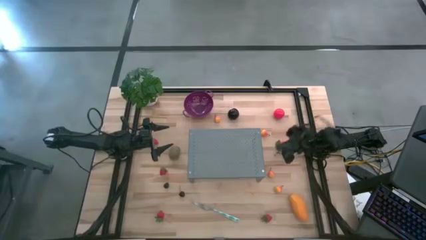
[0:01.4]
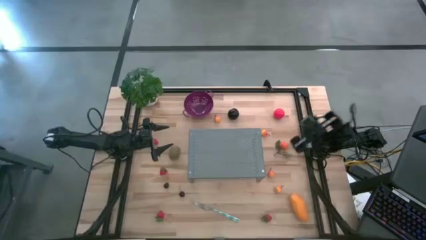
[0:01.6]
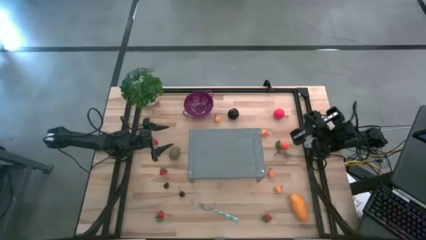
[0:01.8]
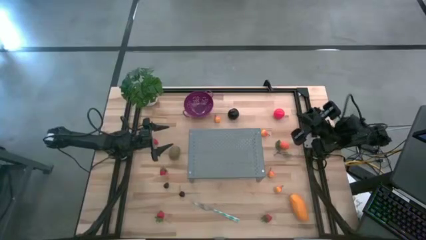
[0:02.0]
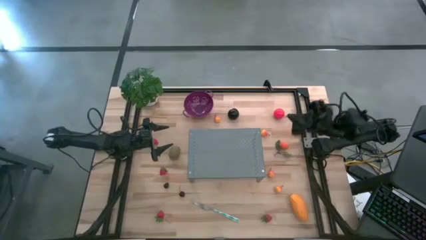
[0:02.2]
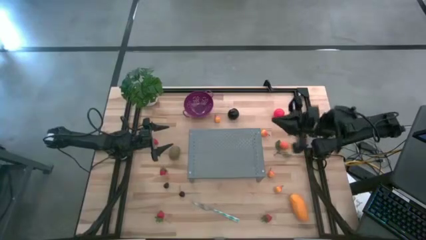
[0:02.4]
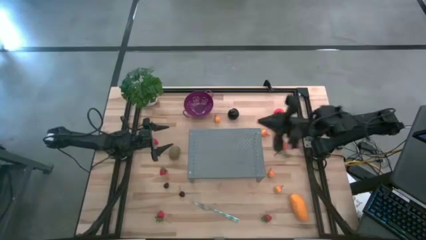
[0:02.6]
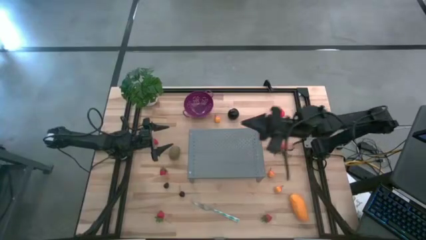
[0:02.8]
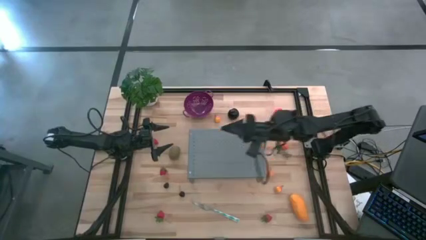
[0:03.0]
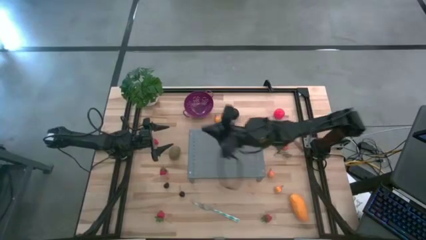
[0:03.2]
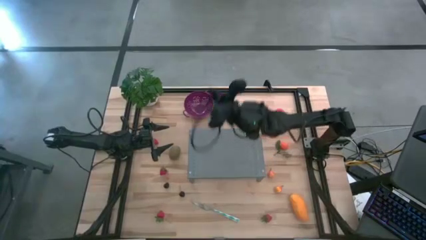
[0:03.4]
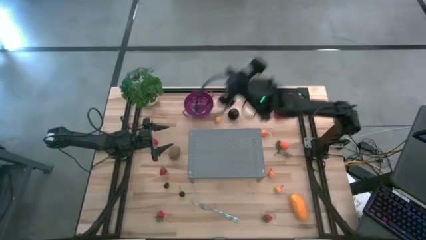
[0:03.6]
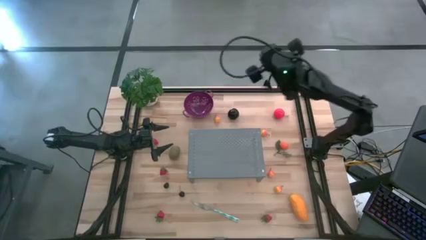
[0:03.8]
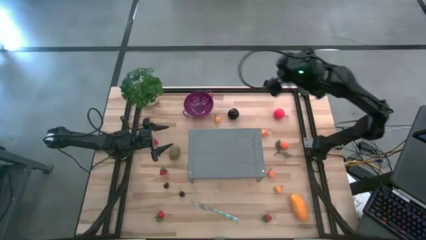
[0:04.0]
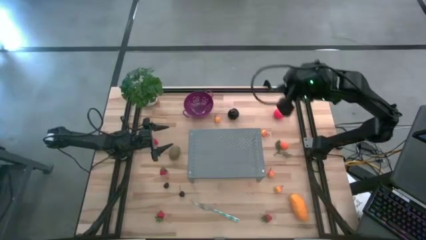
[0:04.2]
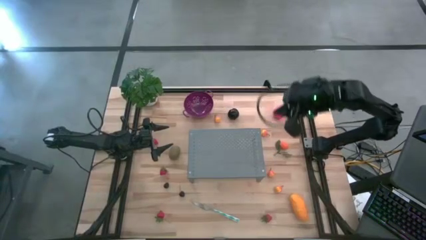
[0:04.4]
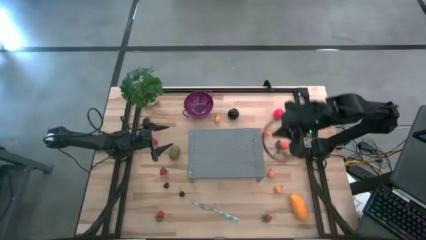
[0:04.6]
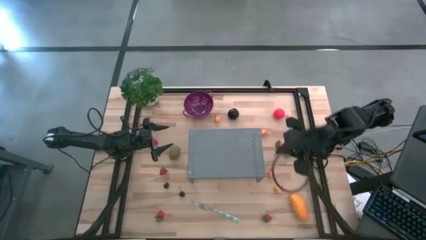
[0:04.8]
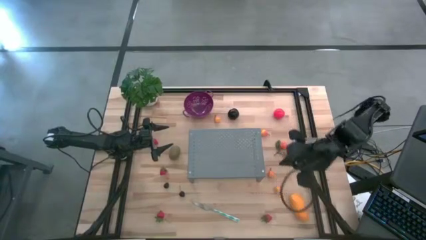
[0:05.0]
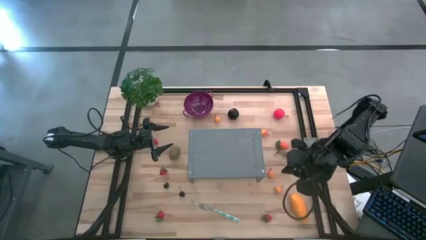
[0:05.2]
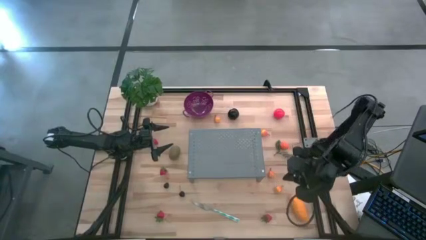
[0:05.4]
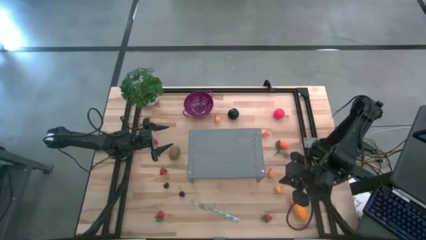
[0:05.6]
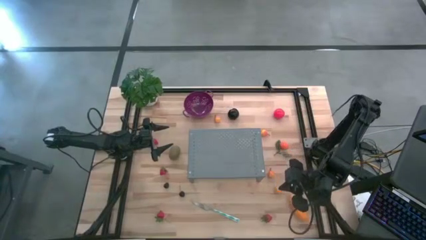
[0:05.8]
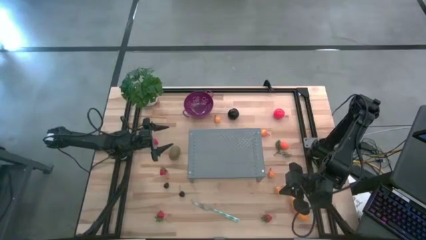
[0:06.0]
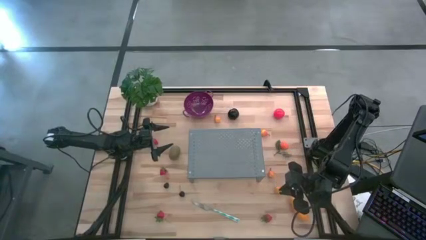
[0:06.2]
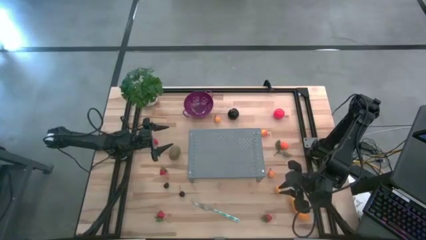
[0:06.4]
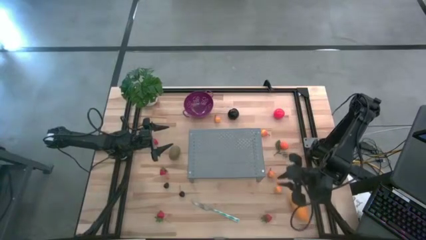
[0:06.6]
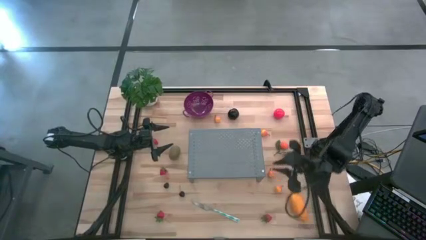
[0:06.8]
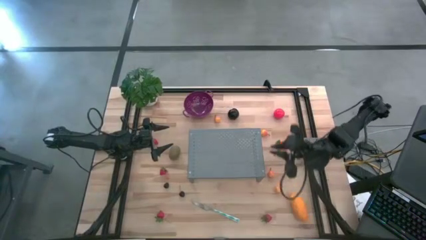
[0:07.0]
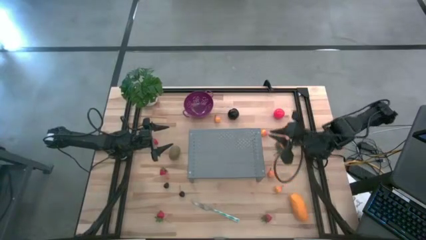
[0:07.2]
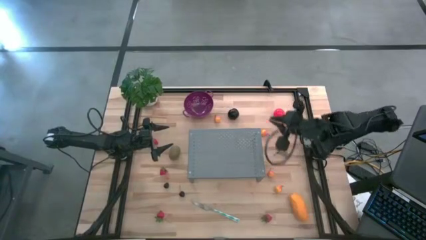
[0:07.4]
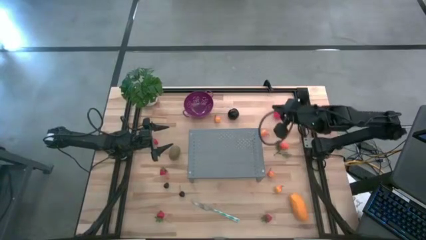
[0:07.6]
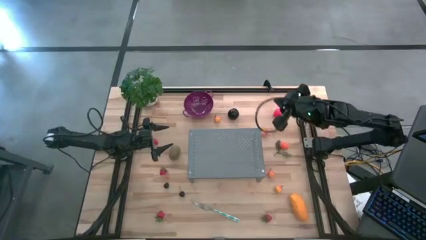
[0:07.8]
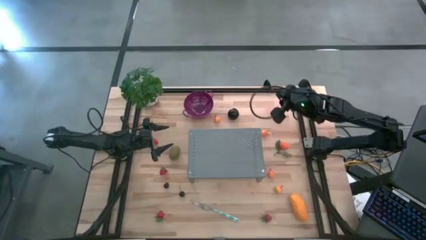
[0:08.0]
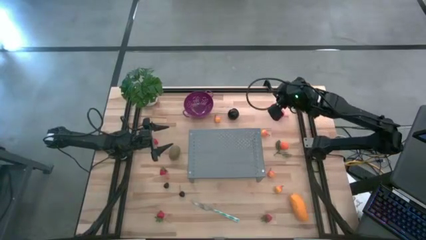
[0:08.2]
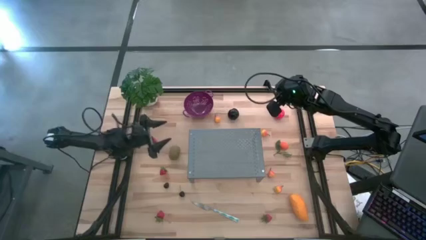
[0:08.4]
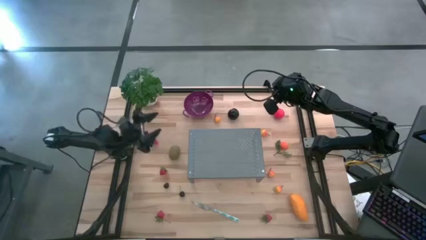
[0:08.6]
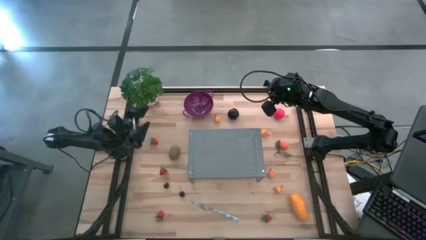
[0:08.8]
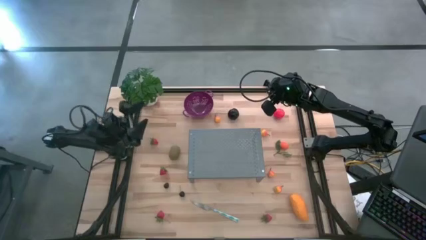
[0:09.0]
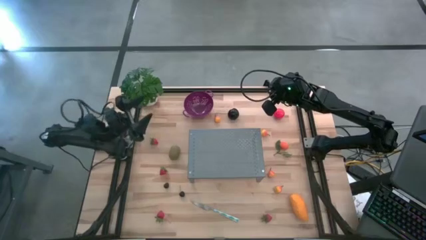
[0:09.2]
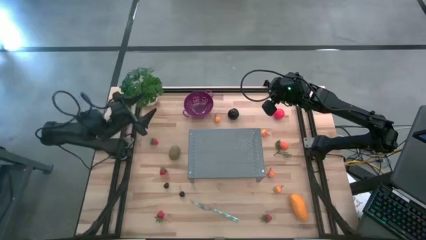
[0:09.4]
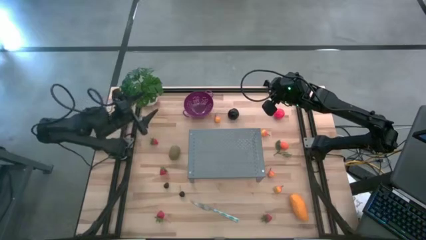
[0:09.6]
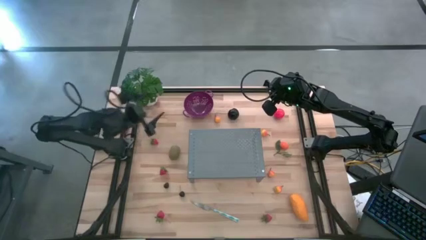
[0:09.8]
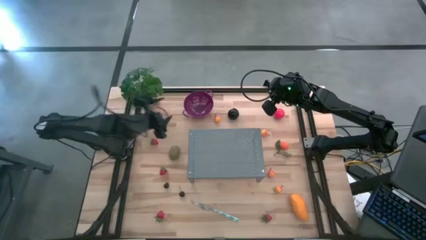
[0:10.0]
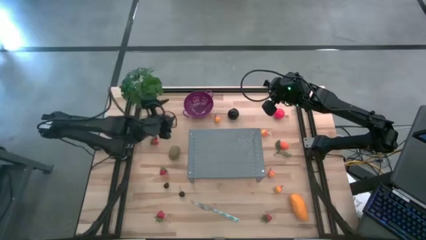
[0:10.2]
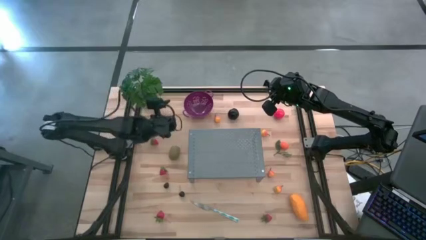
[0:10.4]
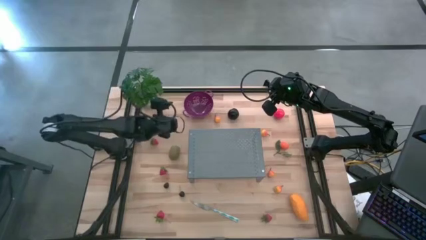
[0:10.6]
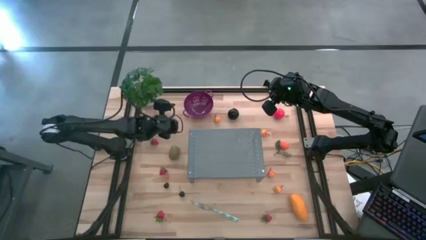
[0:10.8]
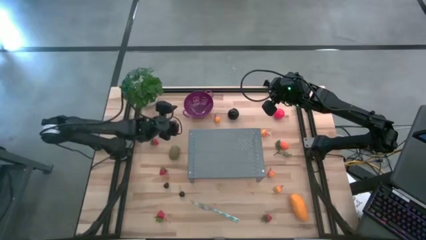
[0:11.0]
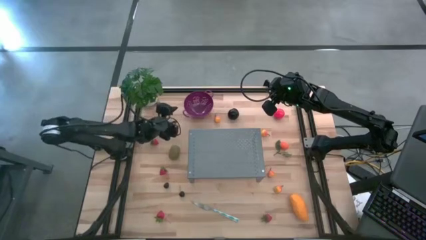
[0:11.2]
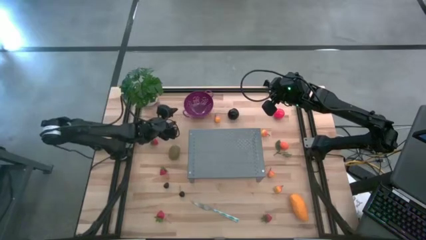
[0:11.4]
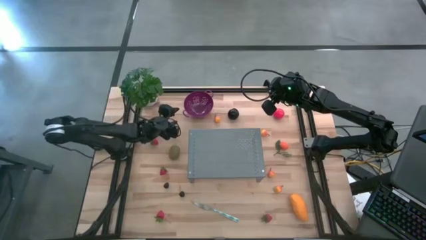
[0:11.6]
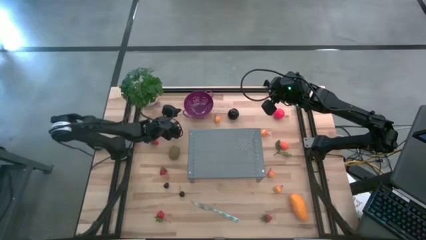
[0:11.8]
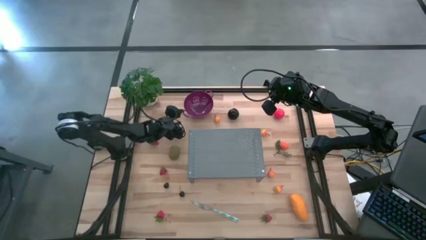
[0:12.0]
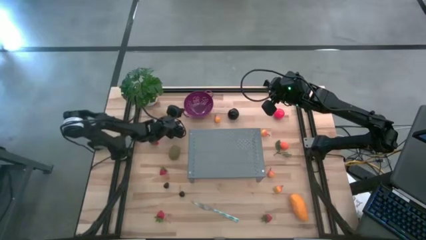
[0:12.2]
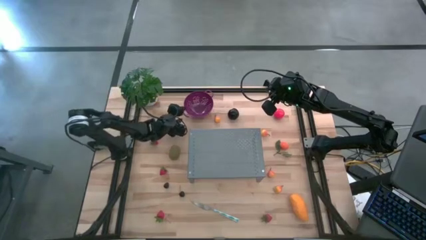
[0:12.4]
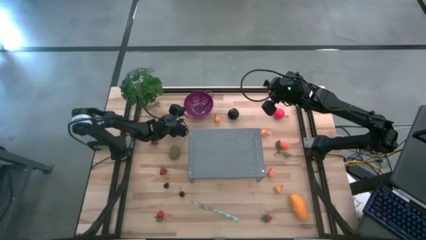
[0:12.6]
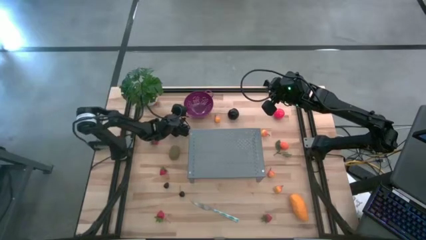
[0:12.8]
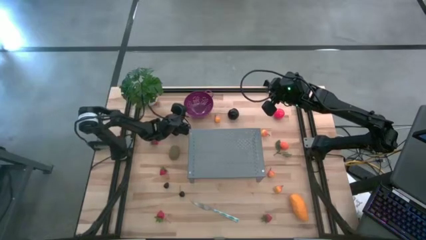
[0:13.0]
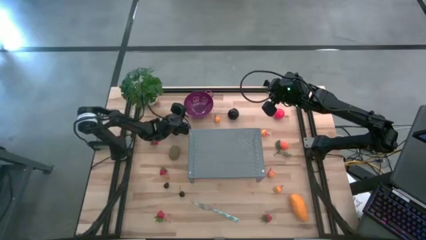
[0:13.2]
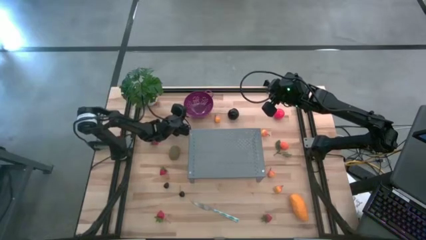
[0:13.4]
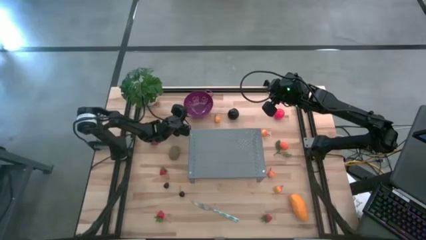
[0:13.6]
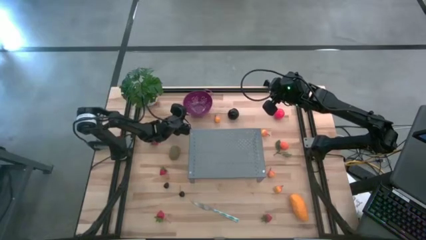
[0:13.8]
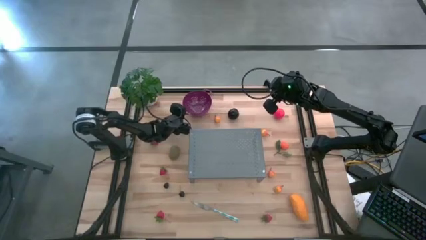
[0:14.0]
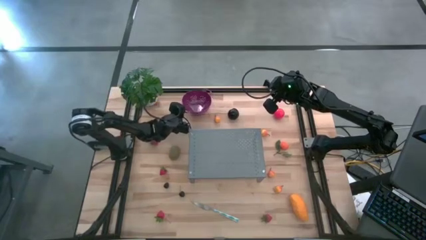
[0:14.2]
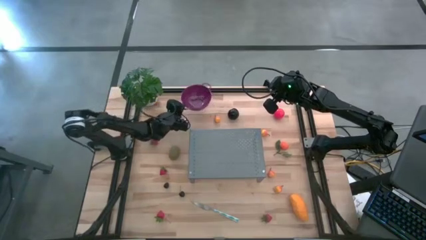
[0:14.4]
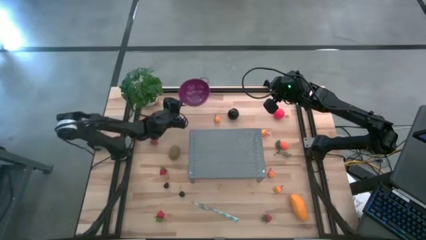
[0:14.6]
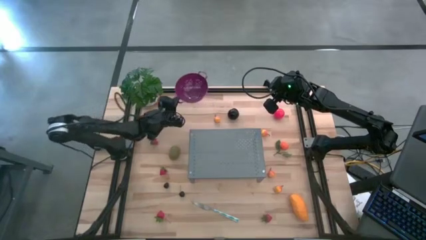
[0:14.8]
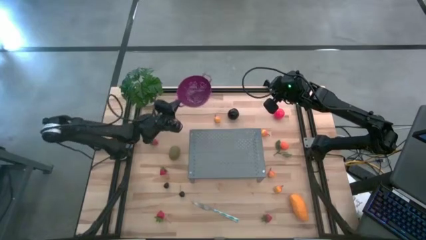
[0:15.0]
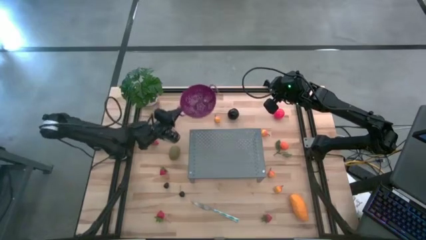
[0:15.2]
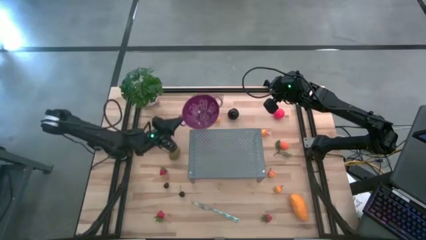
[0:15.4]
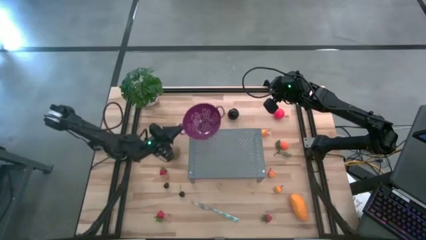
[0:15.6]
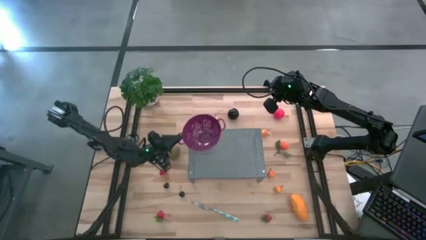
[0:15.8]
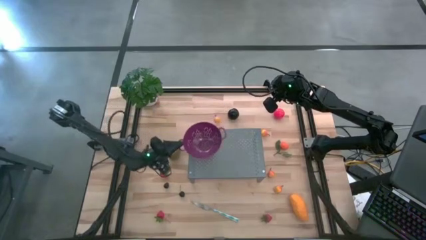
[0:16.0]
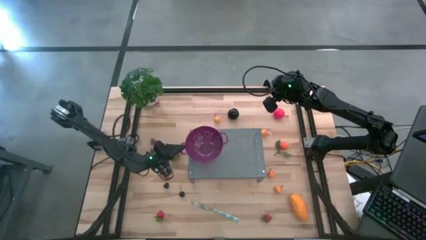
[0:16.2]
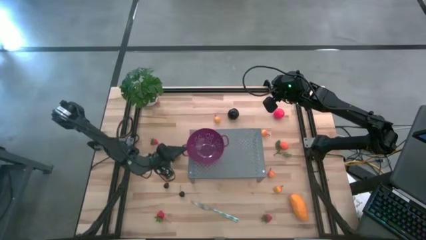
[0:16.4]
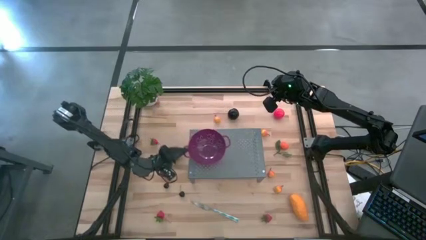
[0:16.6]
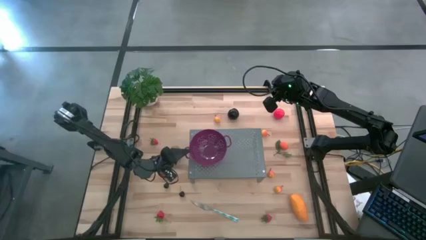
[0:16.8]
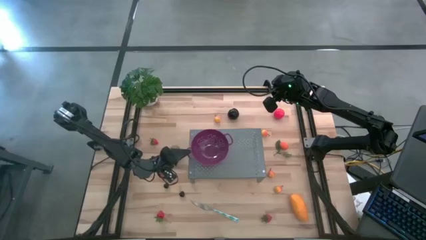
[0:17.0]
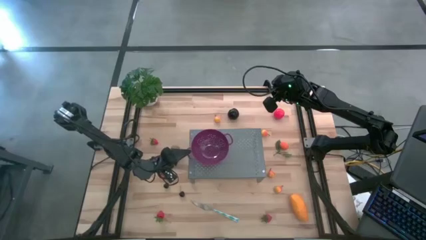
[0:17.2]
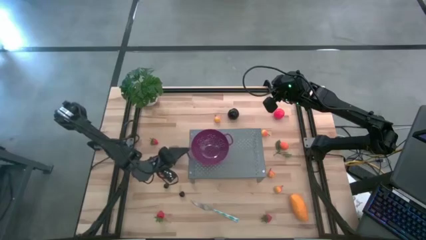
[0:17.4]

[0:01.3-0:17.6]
Task: Pick & Place Fruit
Put the purple strainer bowl on the shelf
